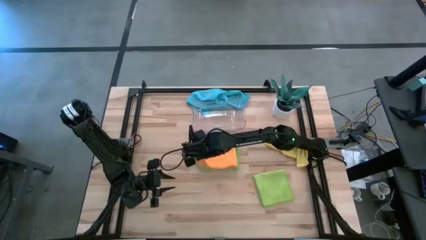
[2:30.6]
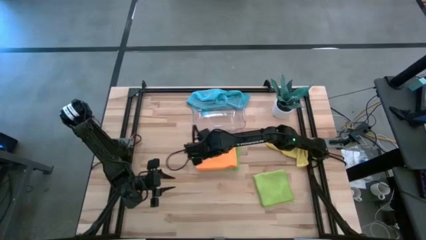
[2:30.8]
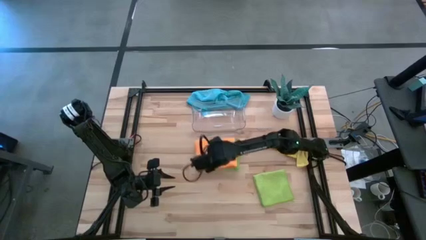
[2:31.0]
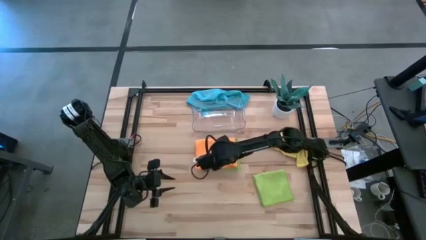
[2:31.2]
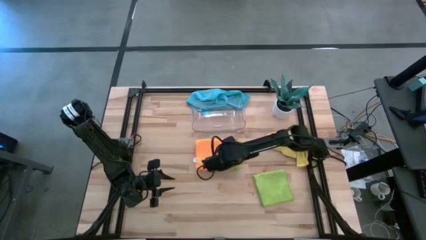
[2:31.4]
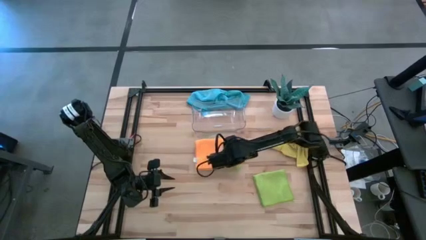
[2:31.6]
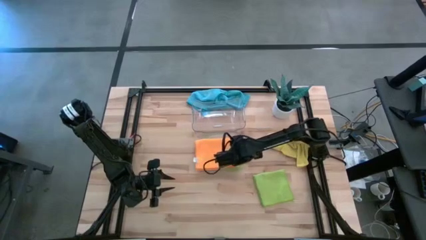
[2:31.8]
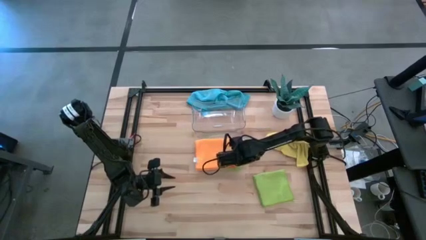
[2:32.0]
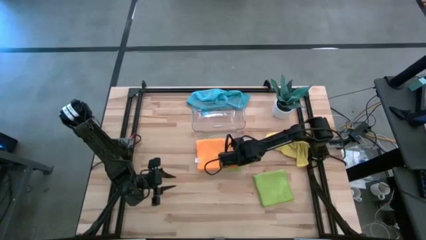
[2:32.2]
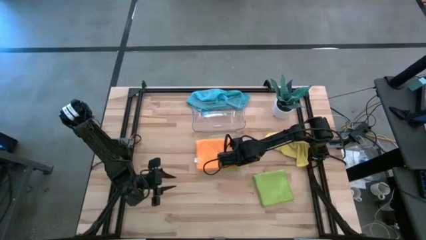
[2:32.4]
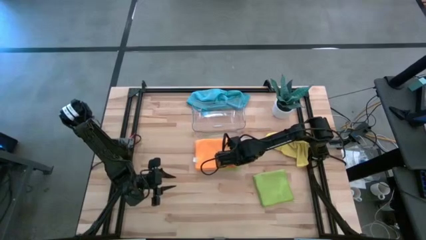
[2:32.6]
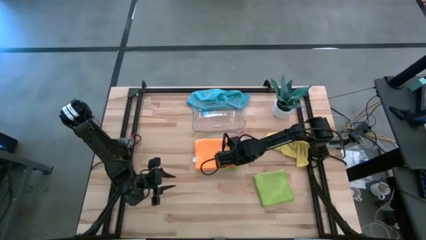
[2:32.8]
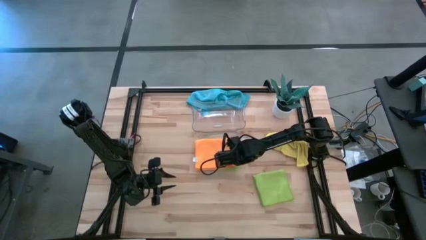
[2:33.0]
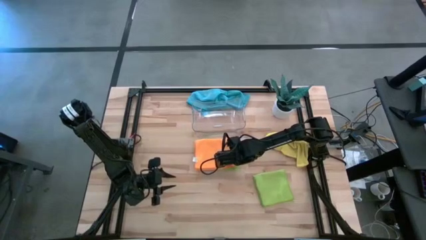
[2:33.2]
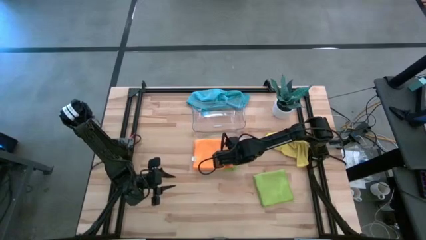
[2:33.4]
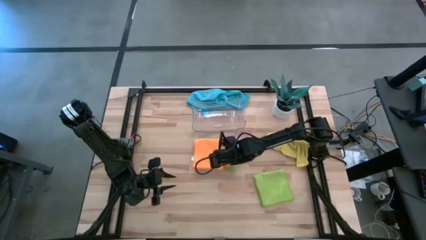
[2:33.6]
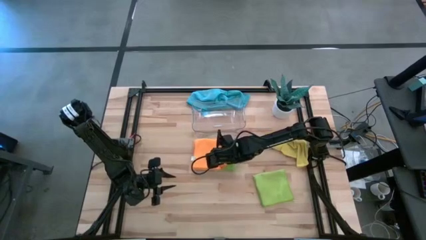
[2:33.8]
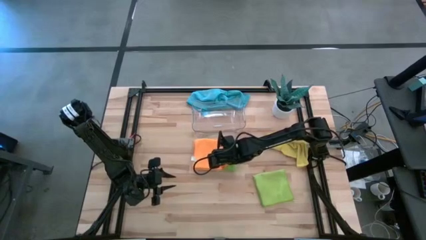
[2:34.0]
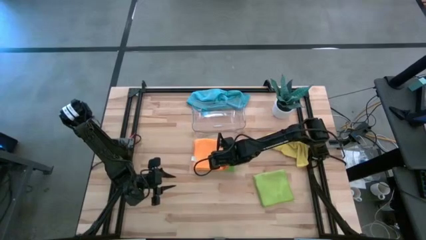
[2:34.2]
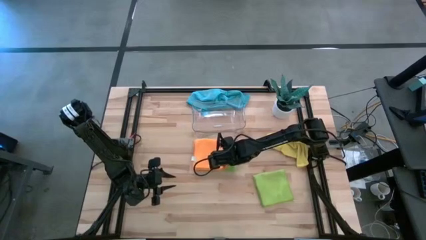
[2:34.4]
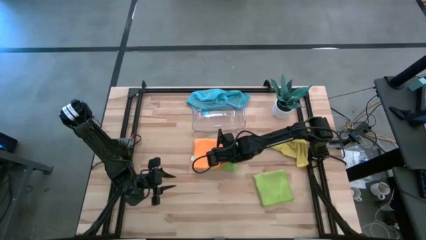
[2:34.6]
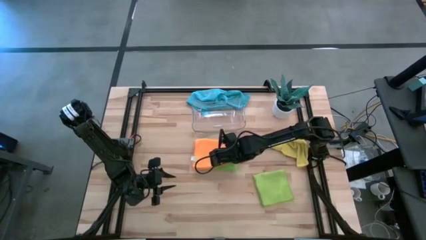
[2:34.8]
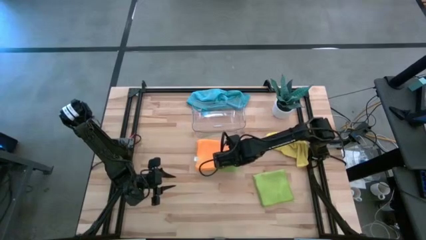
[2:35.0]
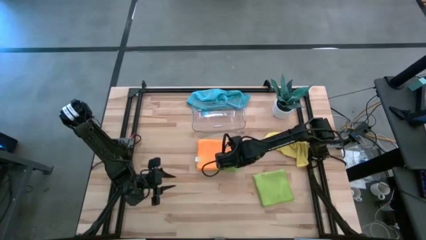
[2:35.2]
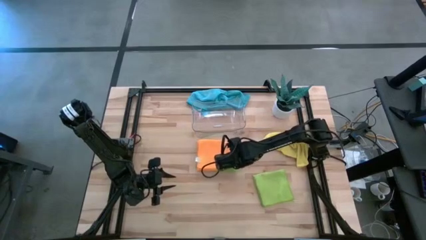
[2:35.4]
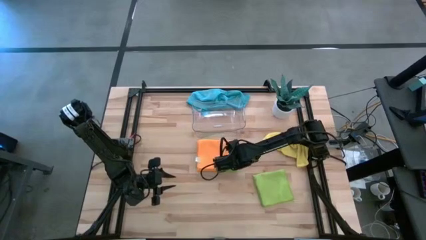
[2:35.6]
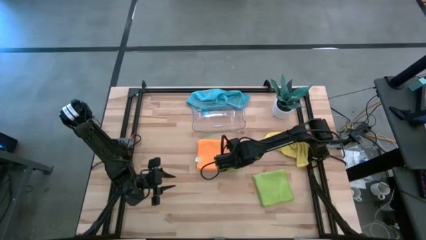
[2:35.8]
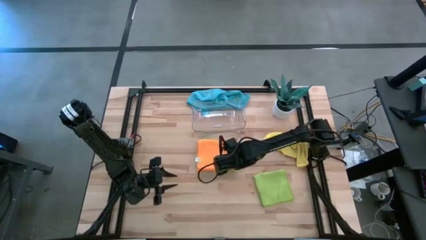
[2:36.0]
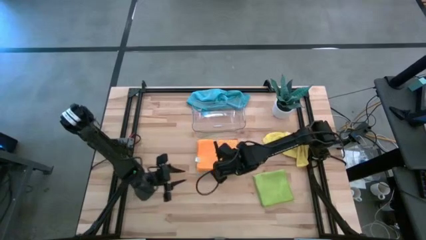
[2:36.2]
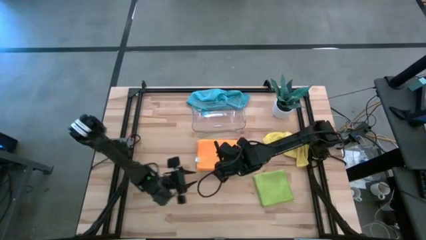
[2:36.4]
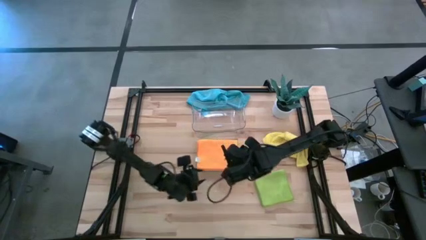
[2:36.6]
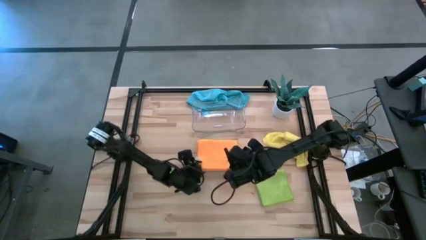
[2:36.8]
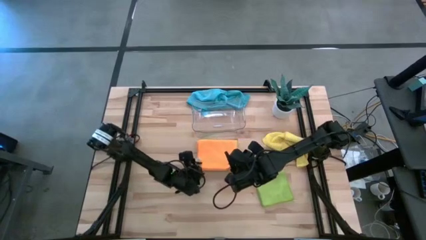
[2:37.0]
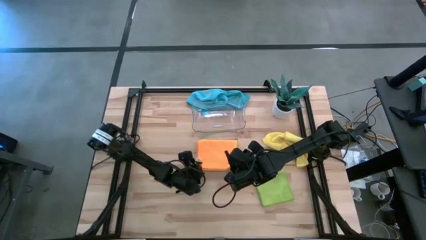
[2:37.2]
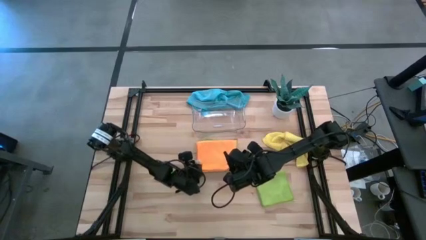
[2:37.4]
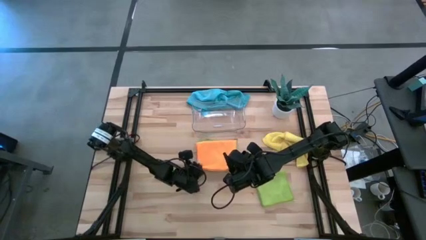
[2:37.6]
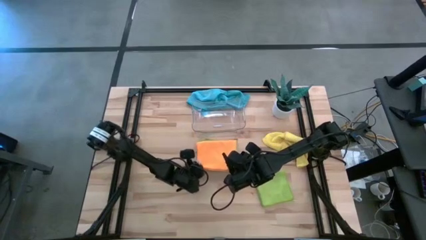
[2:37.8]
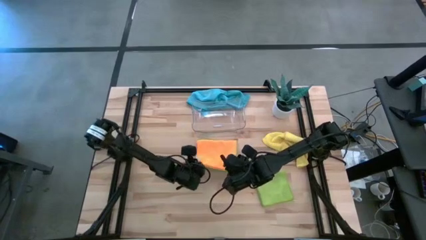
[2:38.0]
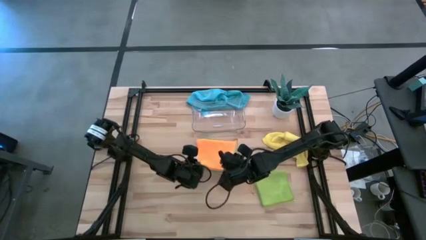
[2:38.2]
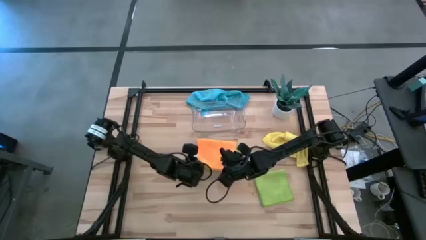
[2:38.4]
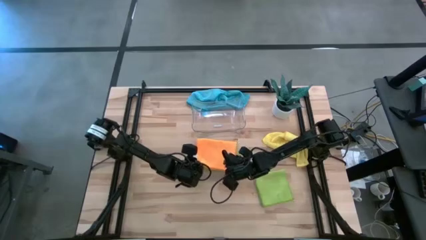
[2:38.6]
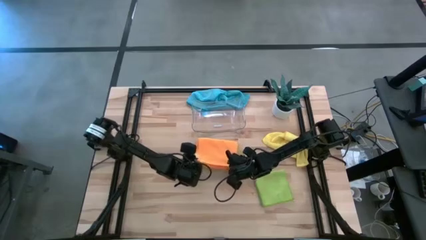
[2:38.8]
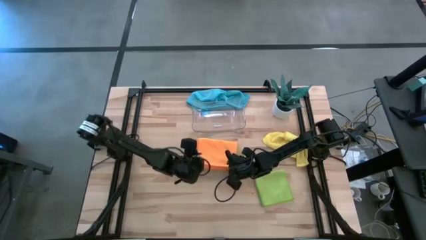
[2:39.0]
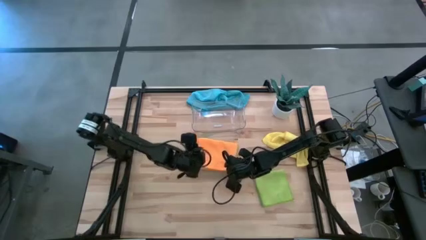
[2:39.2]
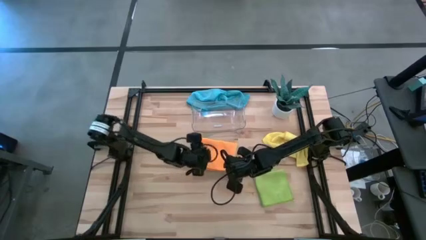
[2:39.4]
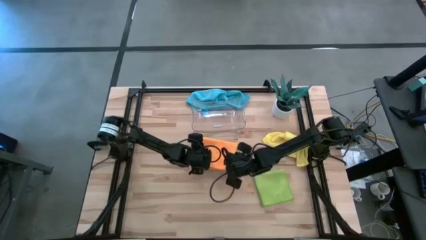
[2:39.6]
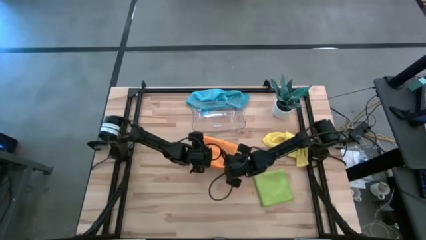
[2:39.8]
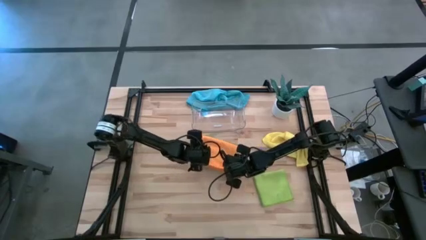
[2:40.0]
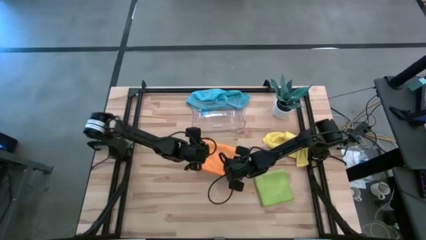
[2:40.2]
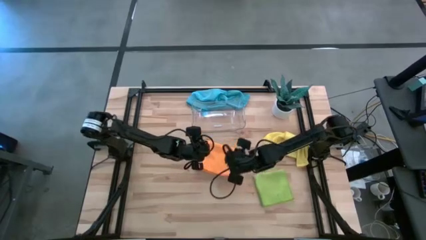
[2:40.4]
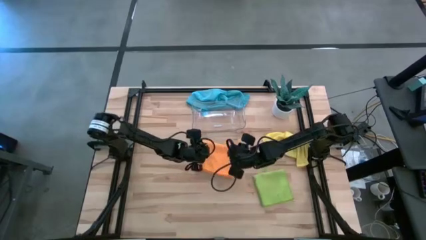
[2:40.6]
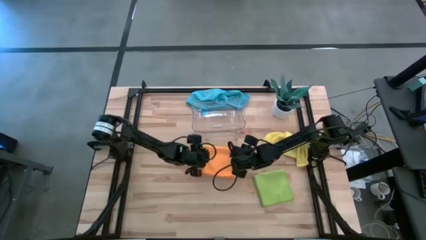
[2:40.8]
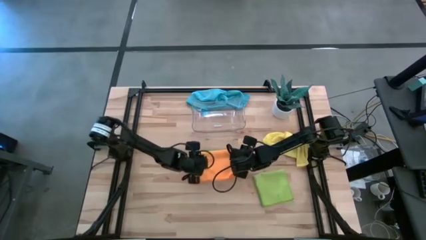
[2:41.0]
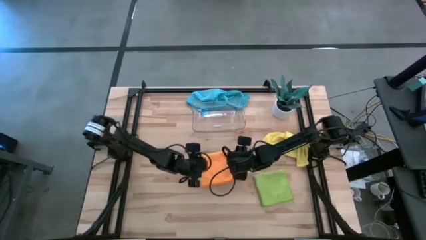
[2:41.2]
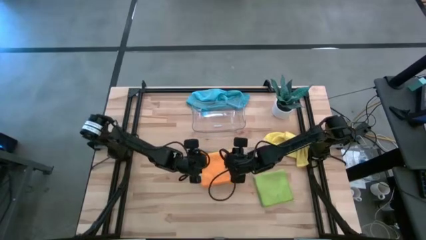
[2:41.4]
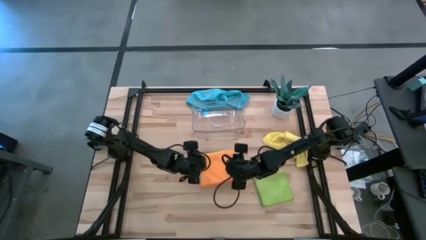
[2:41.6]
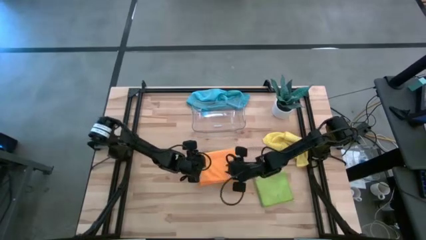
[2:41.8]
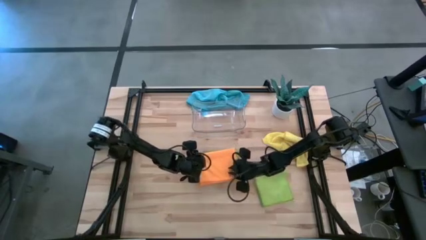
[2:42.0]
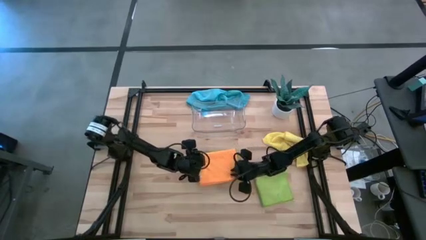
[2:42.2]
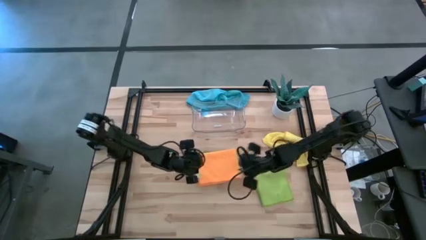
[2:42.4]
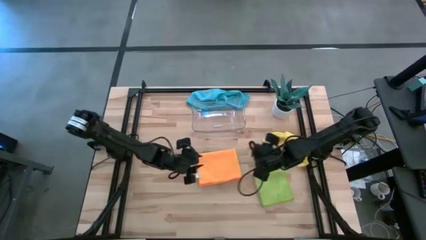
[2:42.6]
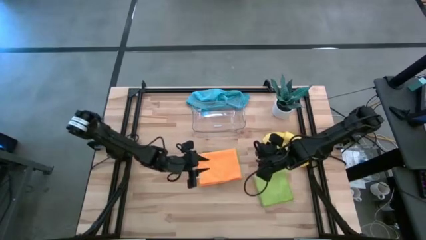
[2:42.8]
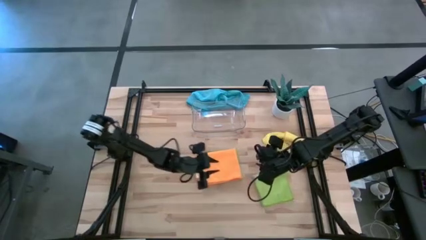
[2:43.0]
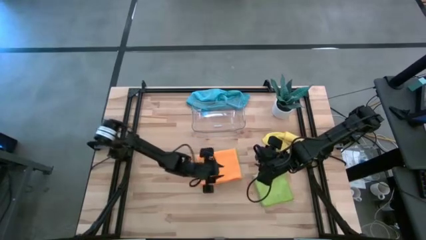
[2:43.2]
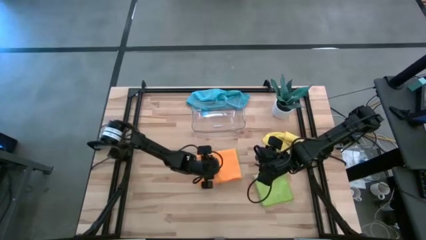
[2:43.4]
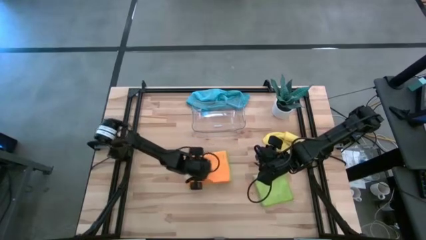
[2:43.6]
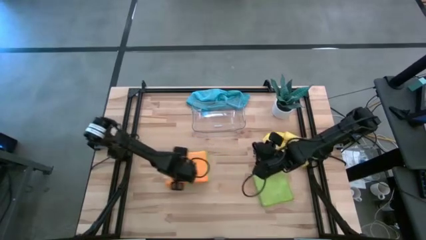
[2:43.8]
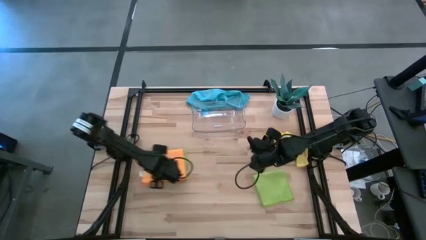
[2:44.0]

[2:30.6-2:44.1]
Task: Fold microfiber towels
Stack the orange microfiber cloth on top of the green microfiber cloth

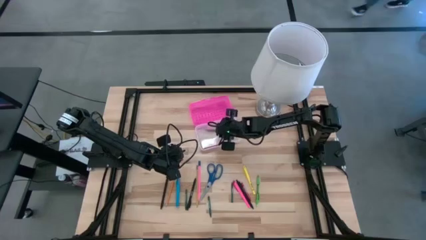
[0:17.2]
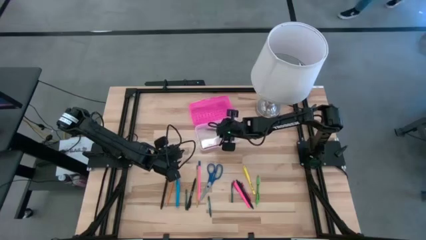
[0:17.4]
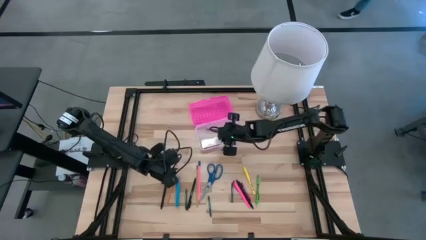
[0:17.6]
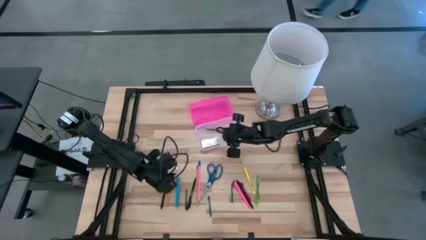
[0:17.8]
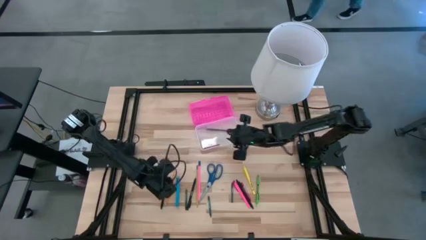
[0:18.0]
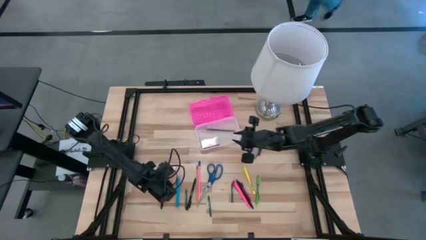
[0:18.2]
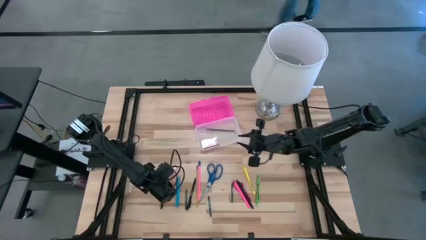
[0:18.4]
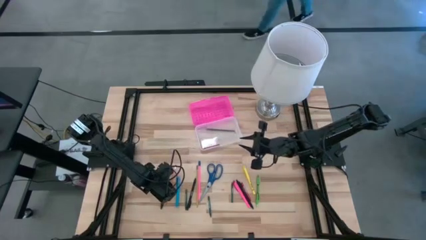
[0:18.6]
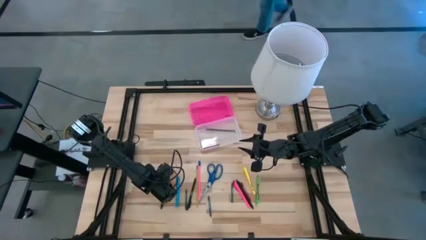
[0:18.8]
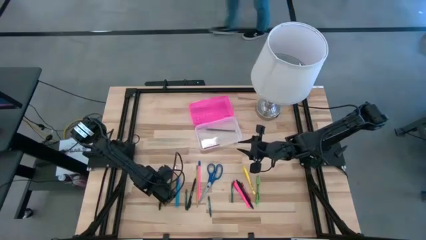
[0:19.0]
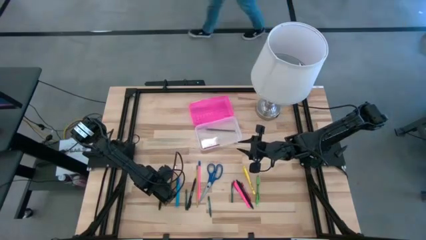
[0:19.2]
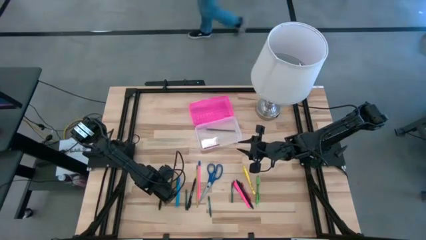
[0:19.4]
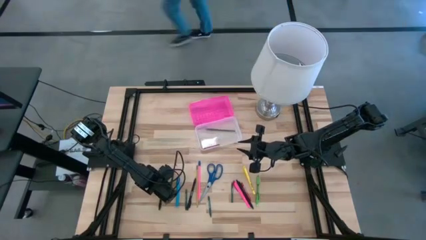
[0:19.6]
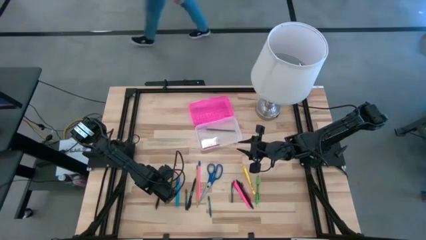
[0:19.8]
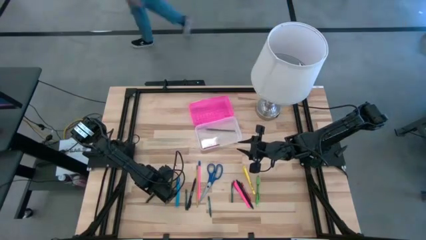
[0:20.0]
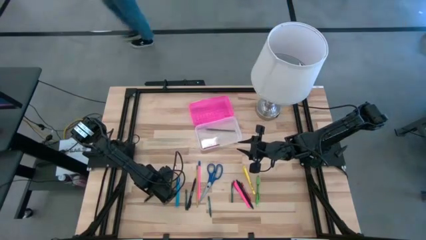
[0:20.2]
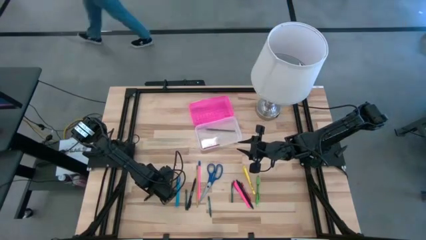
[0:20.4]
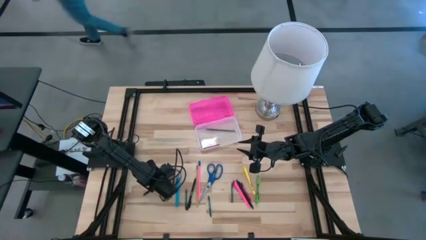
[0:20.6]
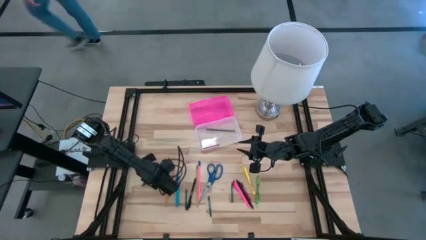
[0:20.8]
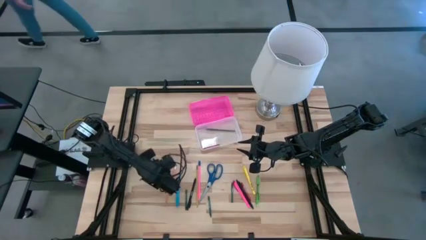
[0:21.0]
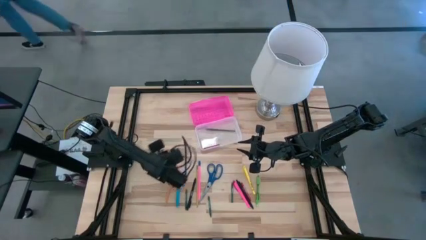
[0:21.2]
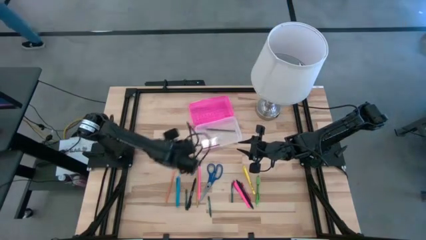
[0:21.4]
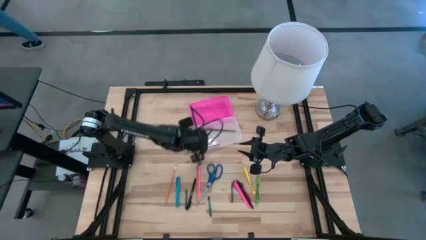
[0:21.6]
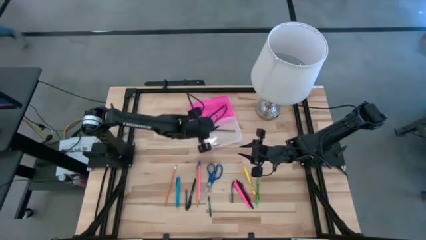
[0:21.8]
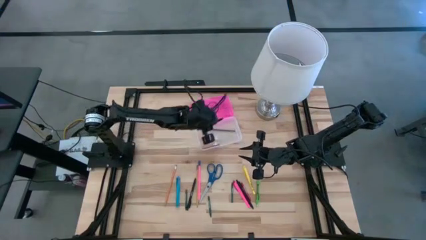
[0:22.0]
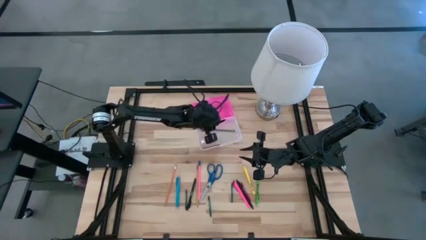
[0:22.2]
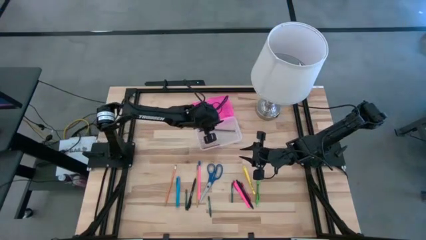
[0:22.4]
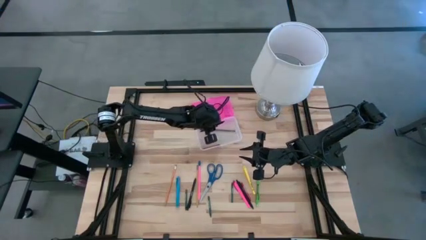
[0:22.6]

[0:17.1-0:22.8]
Task: Pick & place school supplies into a supply box
Put the black pen into the pink supply box
